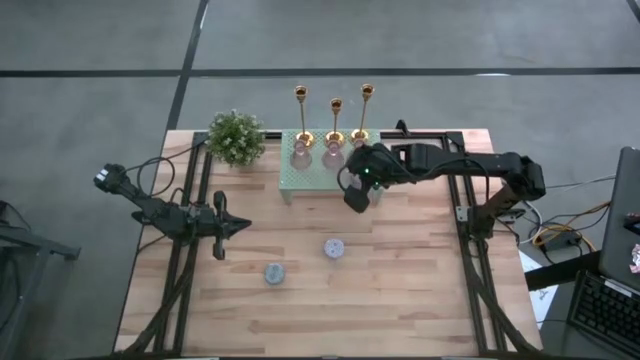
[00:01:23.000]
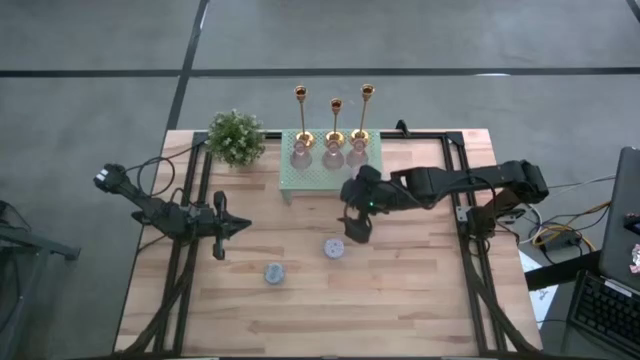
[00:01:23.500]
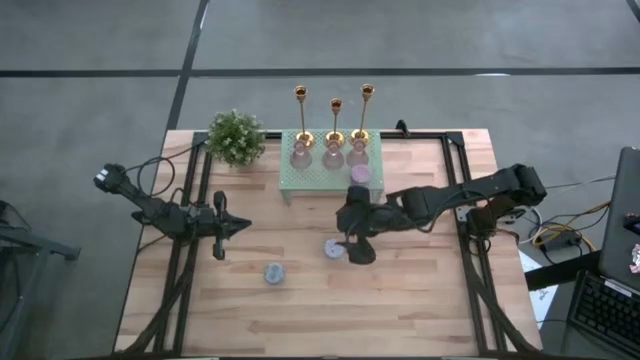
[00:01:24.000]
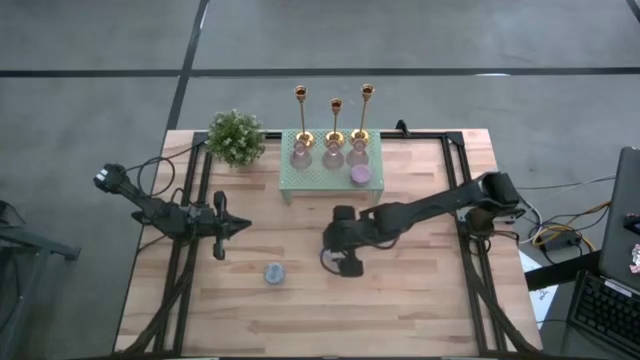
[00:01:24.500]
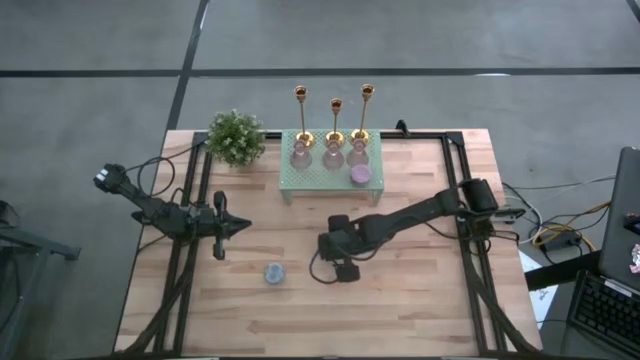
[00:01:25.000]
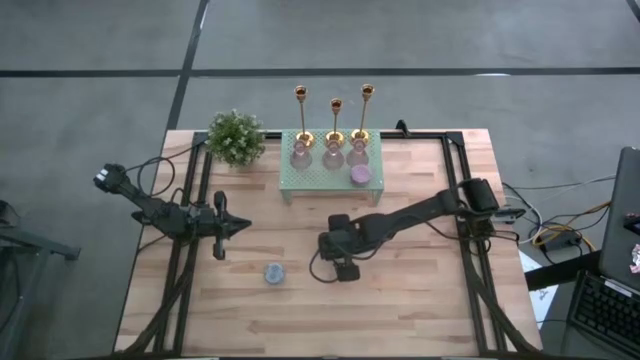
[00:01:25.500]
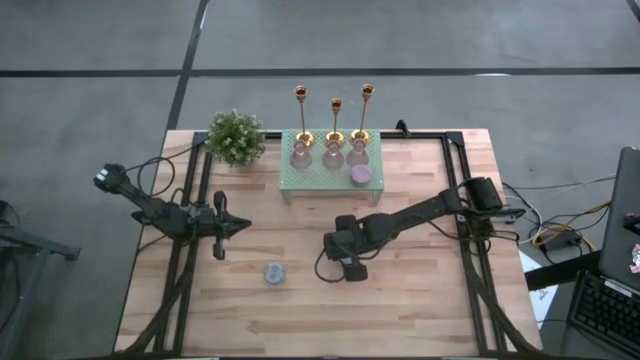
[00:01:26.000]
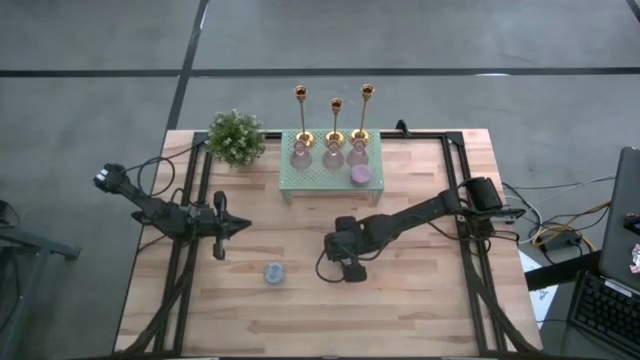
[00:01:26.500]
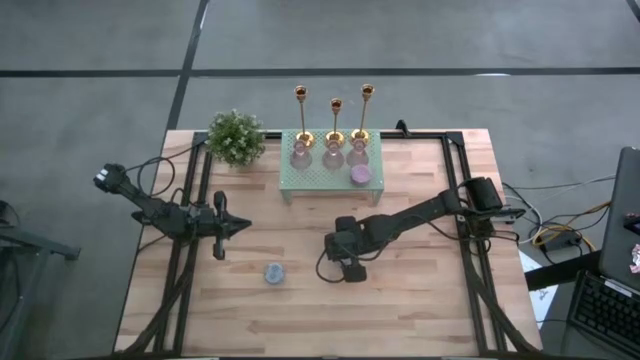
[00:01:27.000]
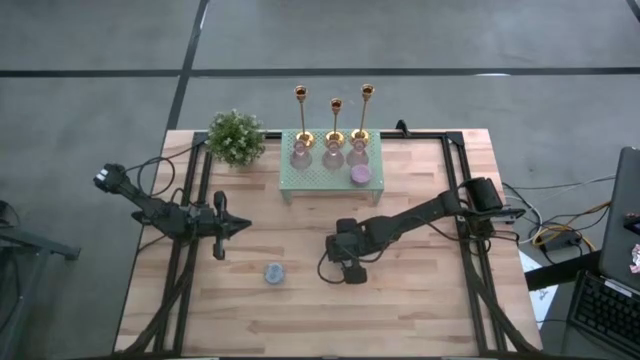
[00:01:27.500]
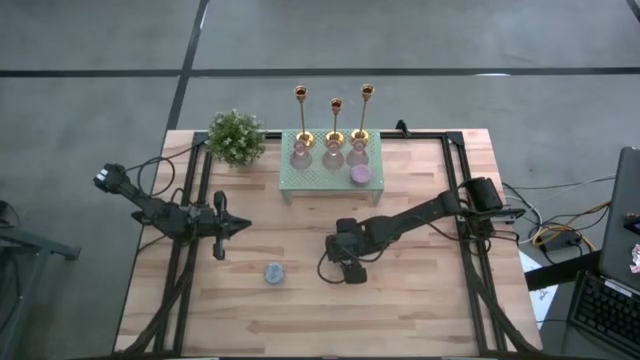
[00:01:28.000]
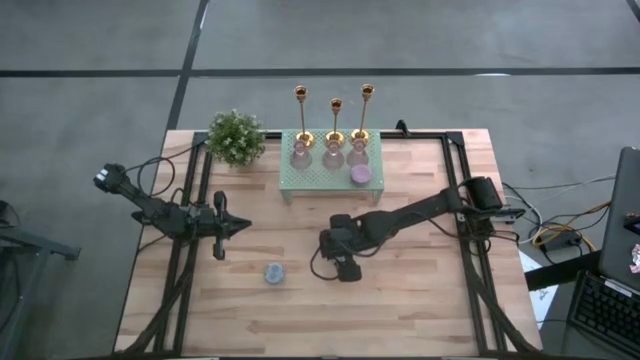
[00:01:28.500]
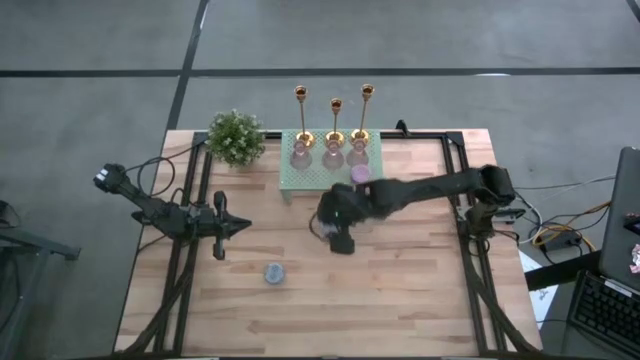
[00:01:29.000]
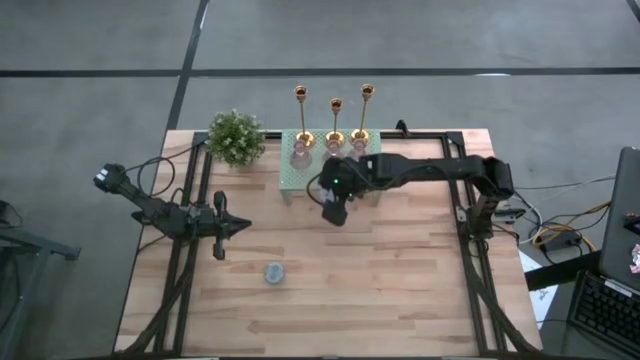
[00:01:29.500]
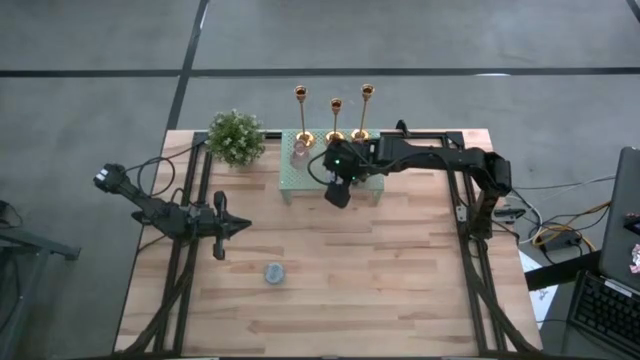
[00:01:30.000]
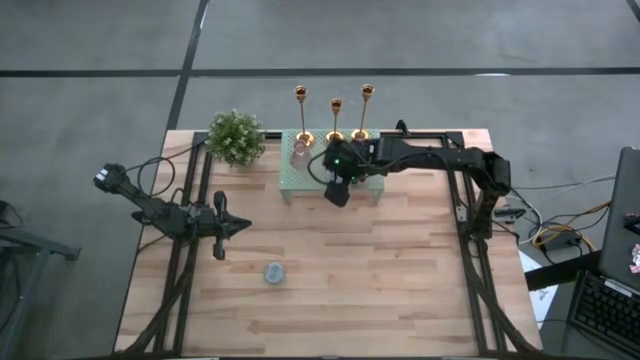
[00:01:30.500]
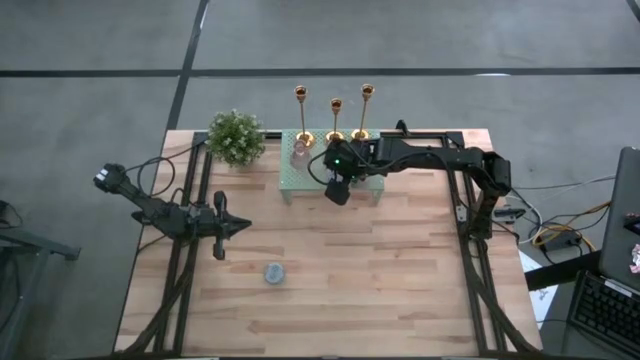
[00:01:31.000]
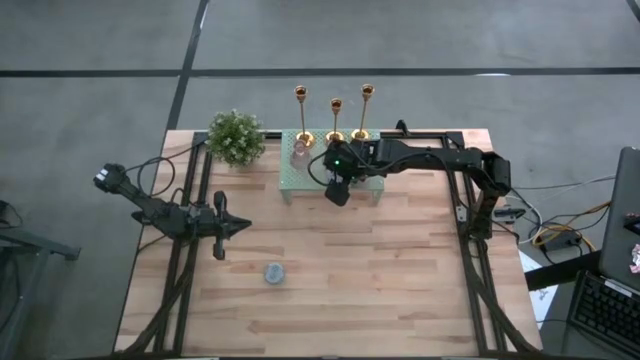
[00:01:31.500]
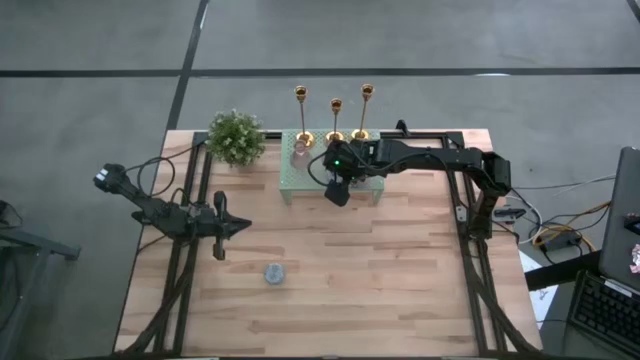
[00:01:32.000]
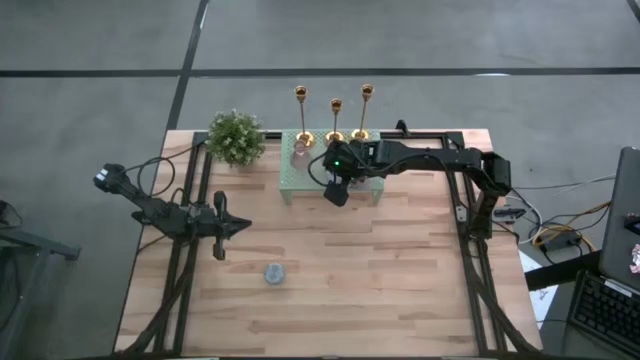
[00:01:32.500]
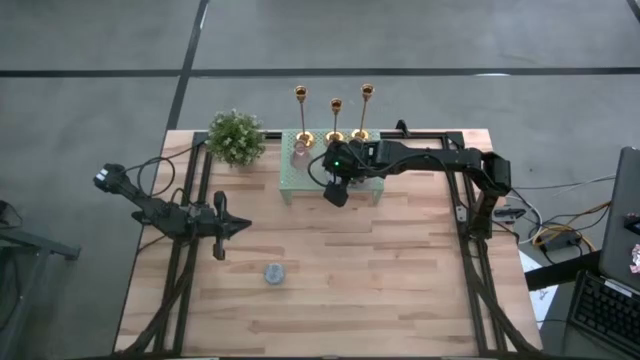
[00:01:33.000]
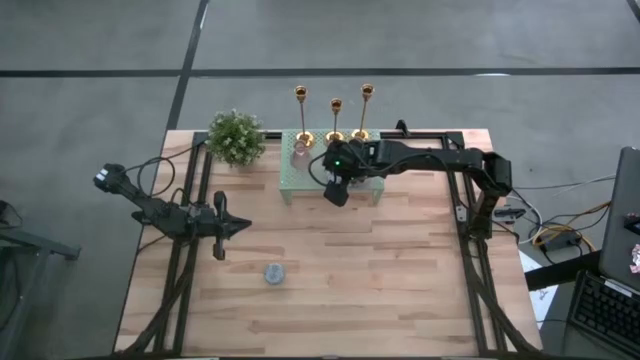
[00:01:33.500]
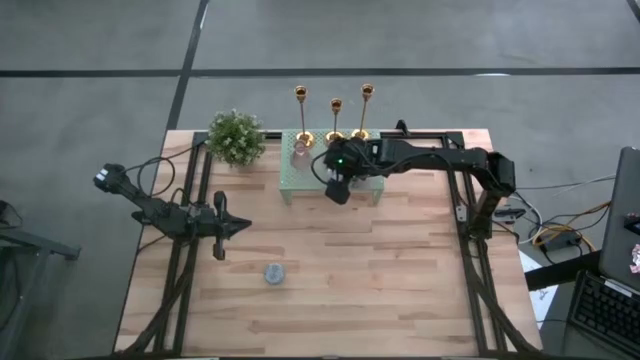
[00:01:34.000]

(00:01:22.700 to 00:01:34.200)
Task: Stock candles and vases on shelf
Align the red patterned scented candle with the other pink patterned scented candle on the shelf

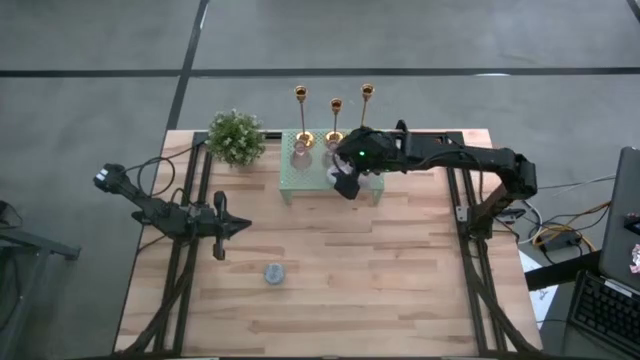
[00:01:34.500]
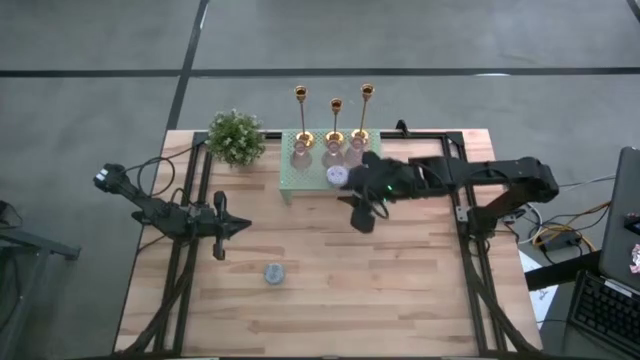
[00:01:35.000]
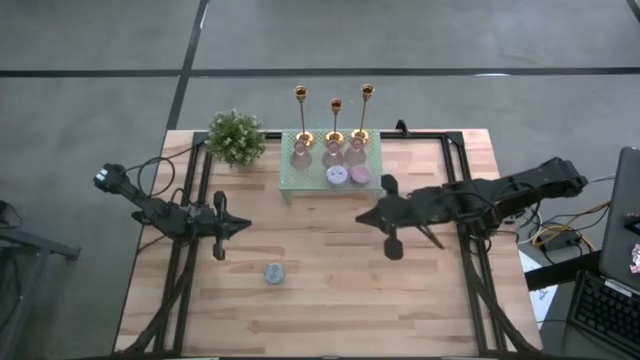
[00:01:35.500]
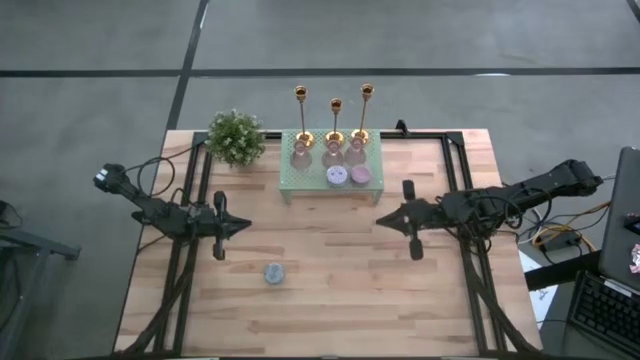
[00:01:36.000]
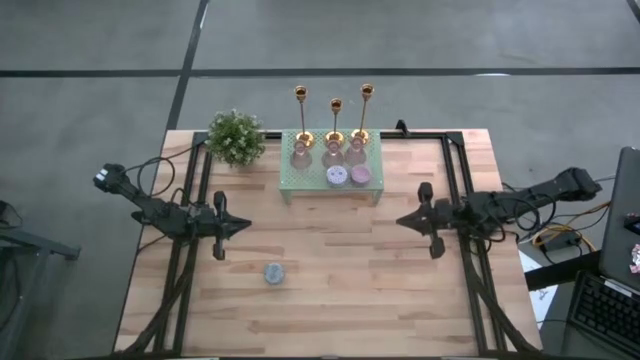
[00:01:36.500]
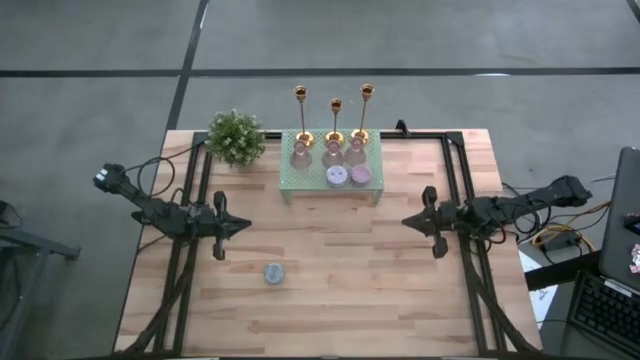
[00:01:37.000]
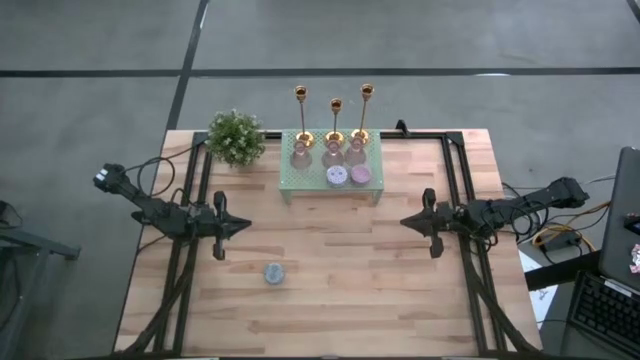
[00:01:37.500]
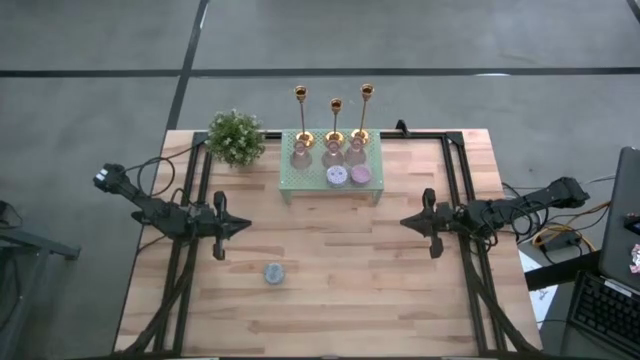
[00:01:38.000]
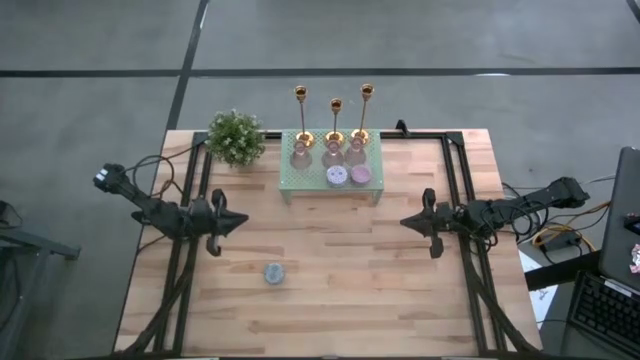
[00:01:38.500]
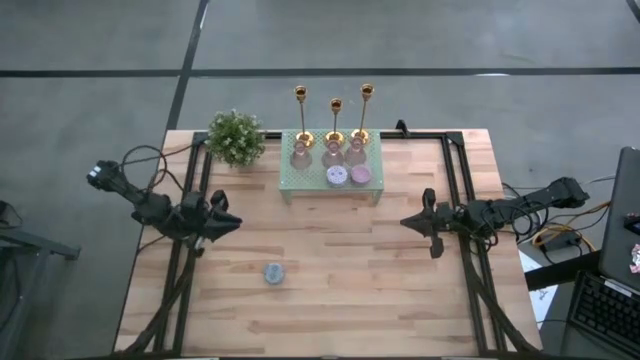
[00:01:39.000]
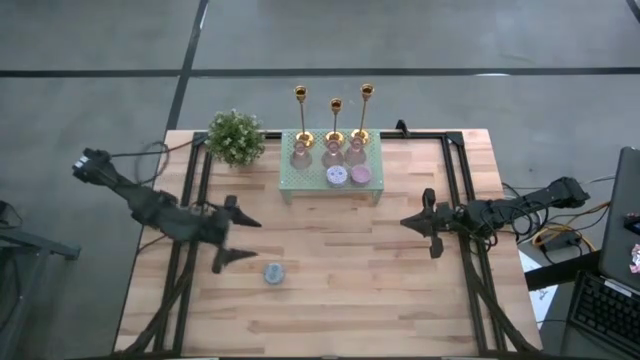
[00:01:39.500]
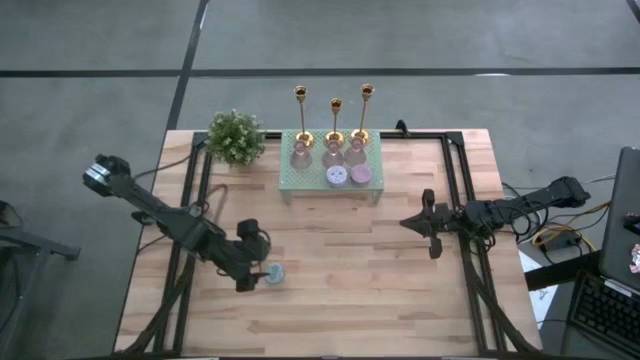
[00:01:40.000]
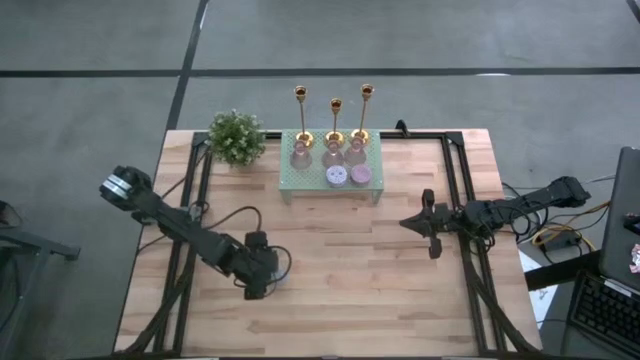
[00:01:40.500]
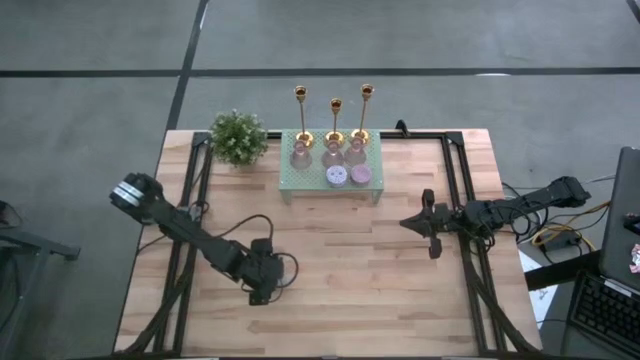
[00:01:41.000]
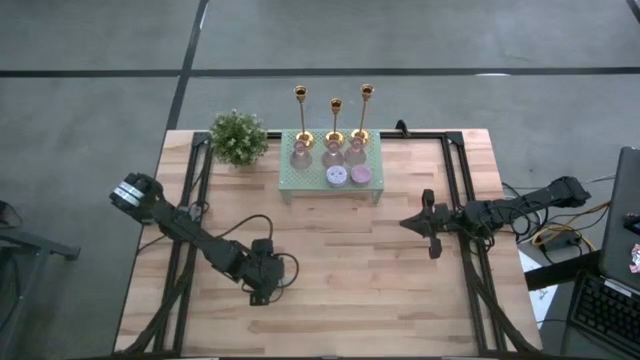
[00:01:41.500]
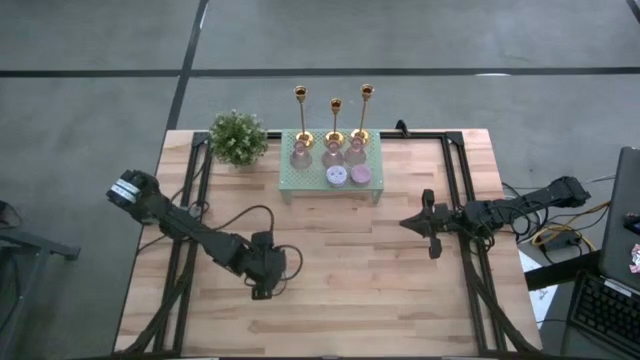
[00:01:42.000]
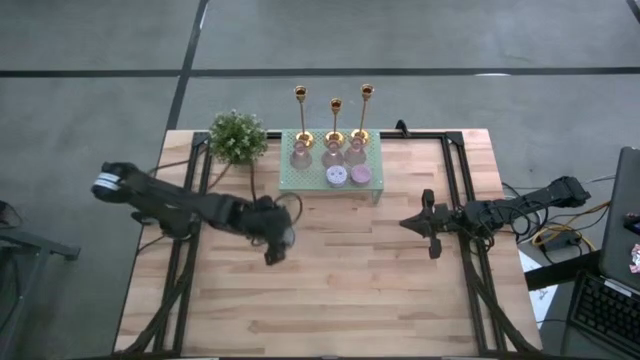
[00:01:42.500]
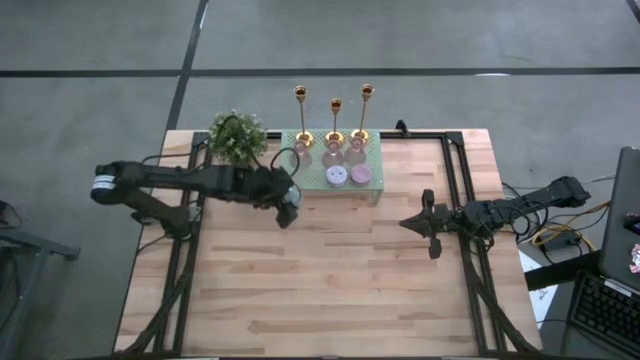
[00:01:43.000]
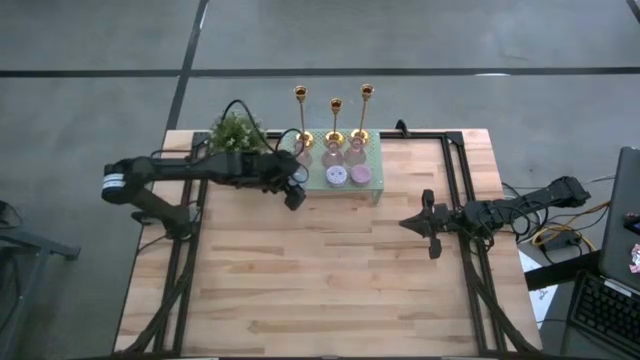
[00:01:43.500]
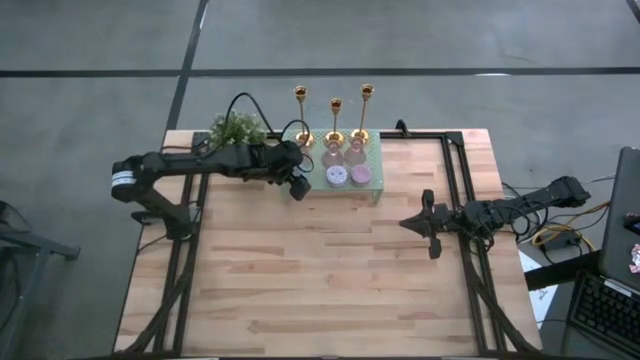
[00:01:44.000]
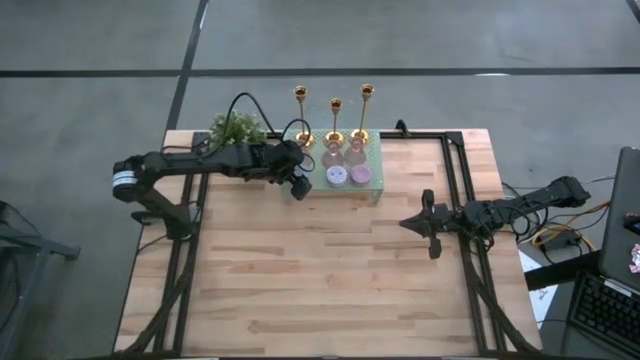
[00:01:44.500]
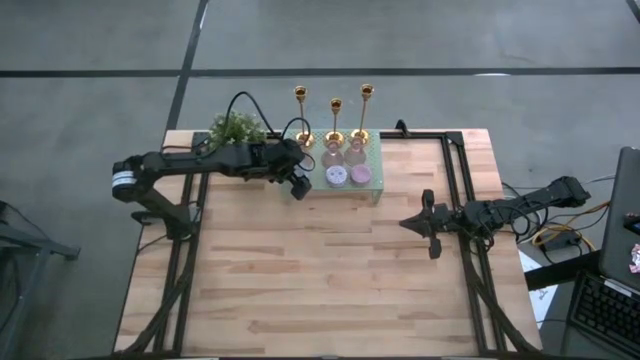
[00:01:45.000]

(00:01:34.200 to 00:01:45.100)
Align the green patterned scented candle with the other scented candles on the shelf
